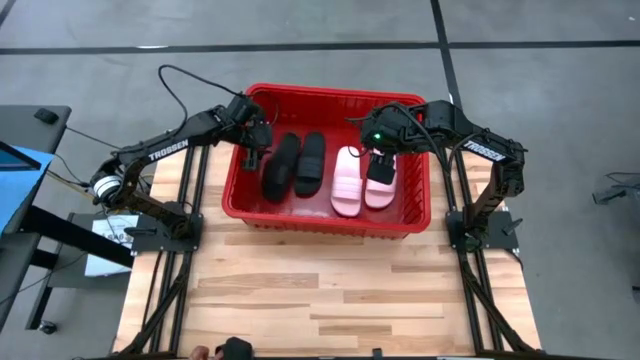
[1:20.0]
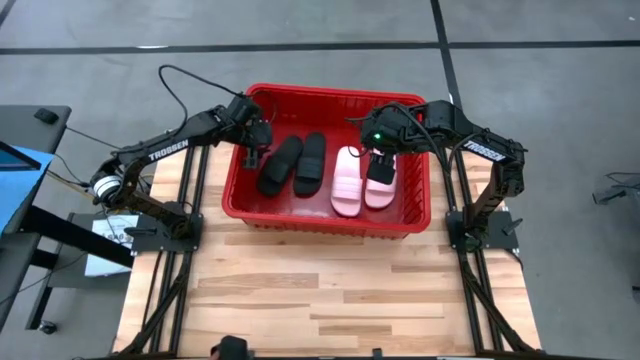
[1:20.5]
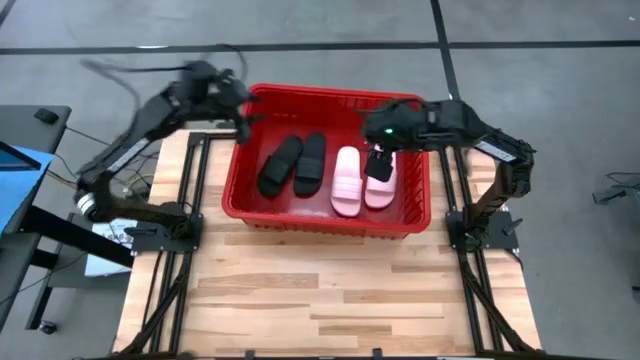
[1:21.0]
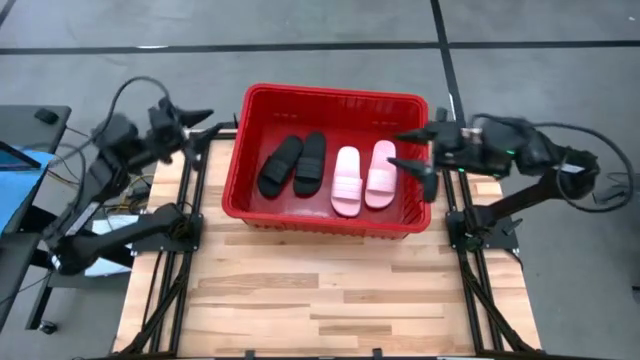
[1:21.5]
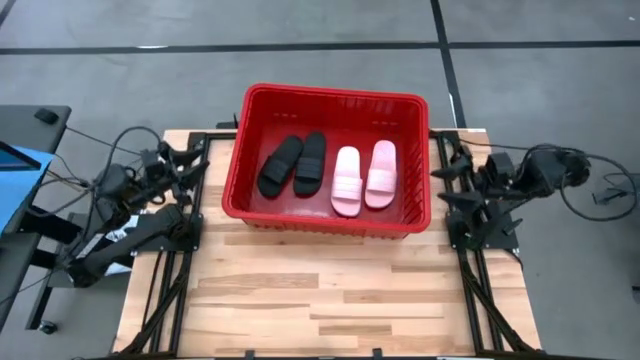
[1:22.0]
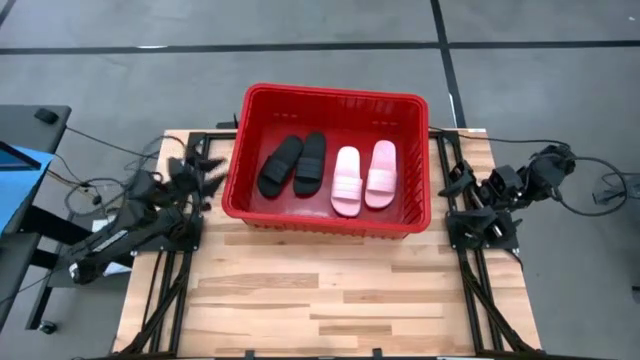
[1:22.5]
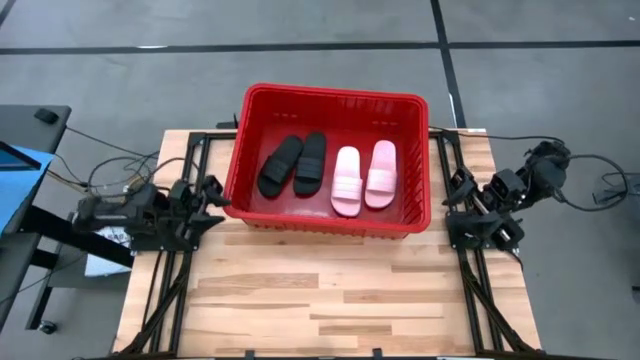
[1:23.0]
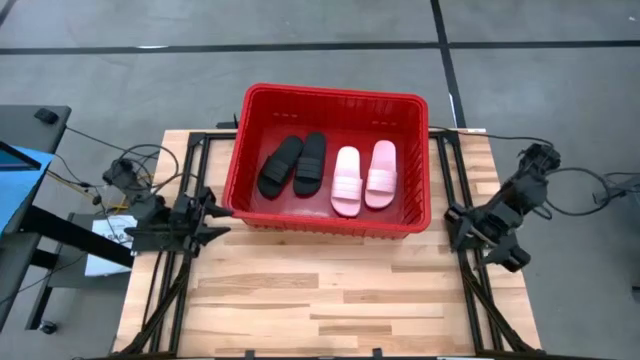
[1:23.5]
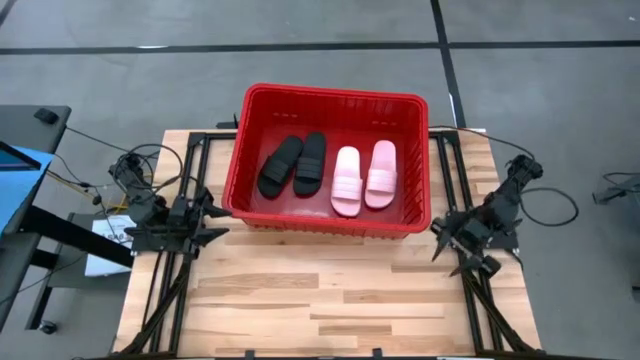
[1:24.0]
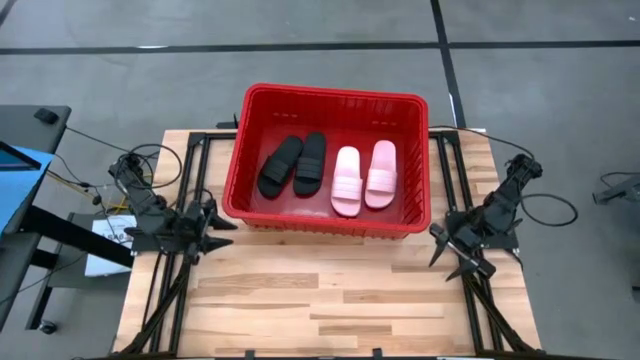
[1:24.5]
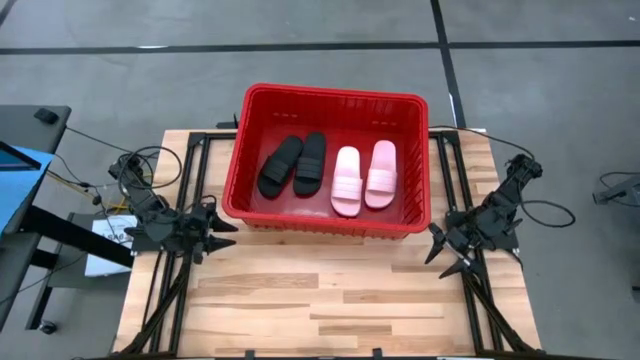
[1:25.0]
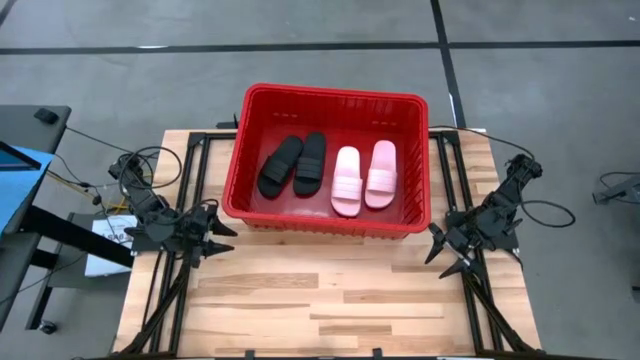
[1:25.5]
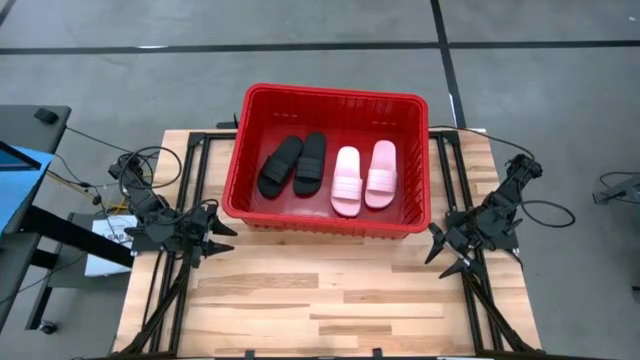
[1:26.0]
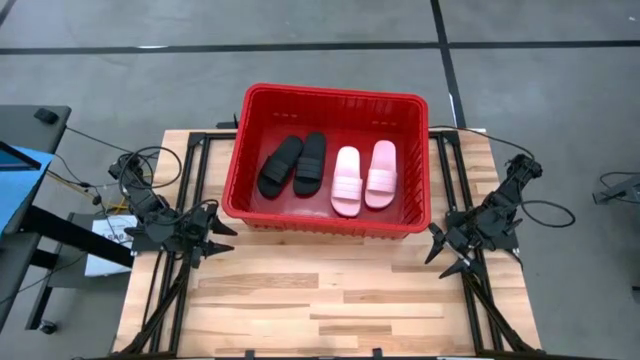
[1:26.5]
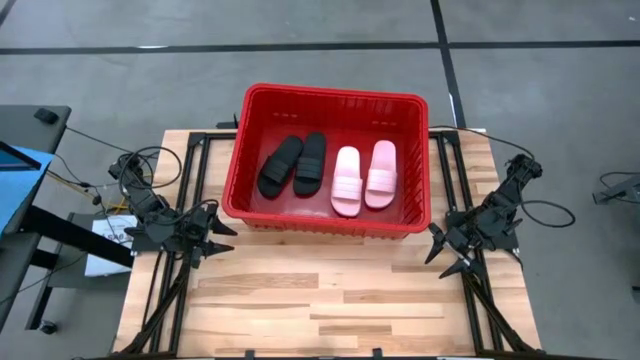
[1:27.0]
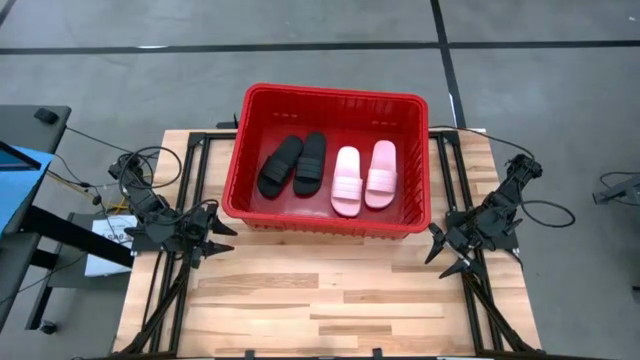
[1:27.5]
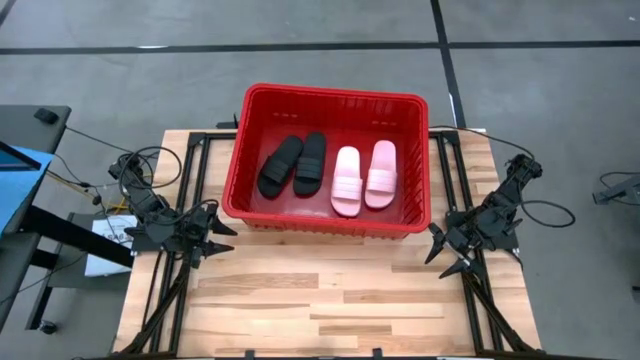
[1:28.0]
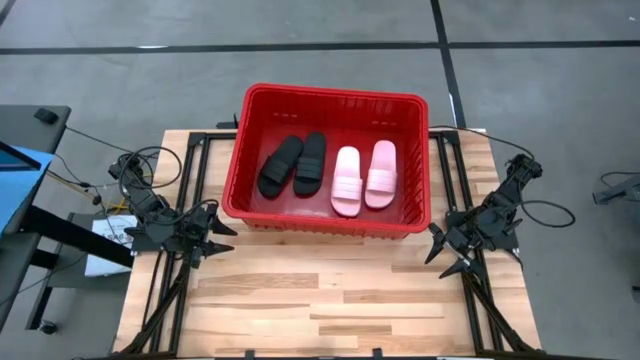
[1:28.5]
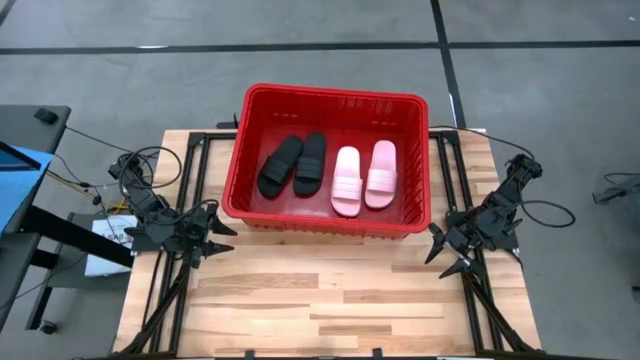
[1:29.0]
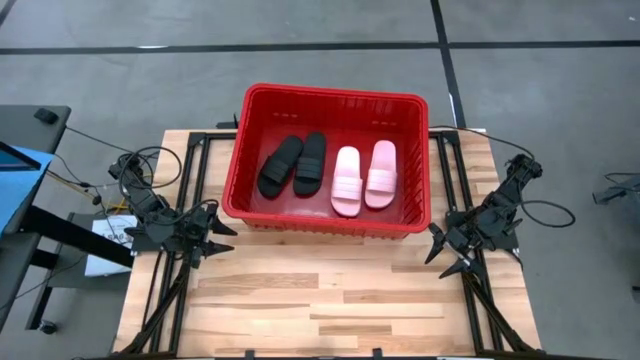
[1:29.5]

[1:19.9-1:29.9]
Task: Pick and place slides into bin
Return to Home Position

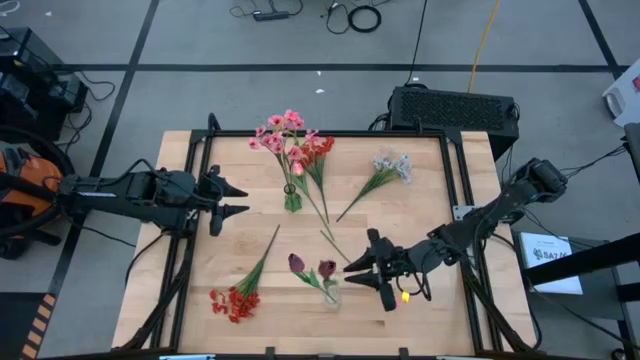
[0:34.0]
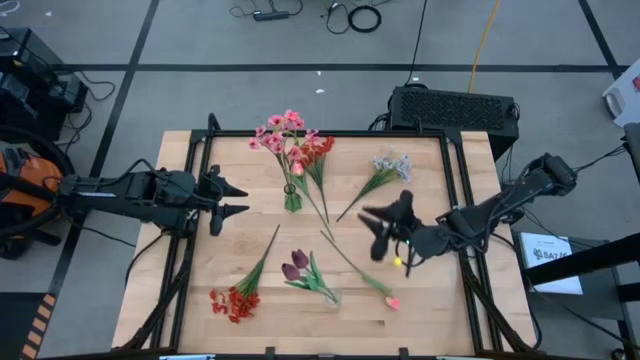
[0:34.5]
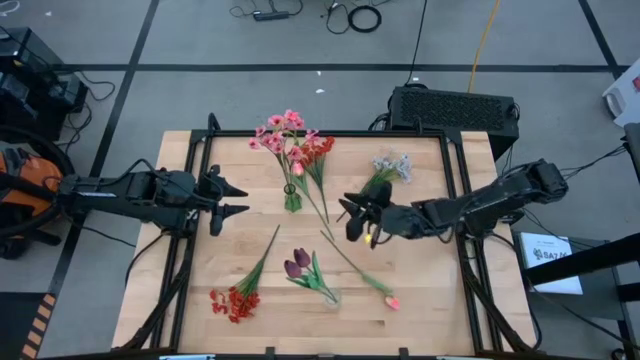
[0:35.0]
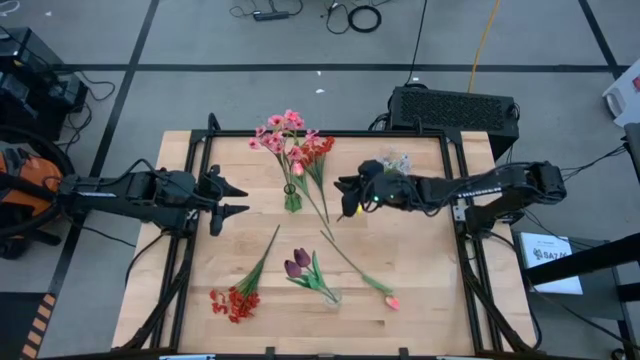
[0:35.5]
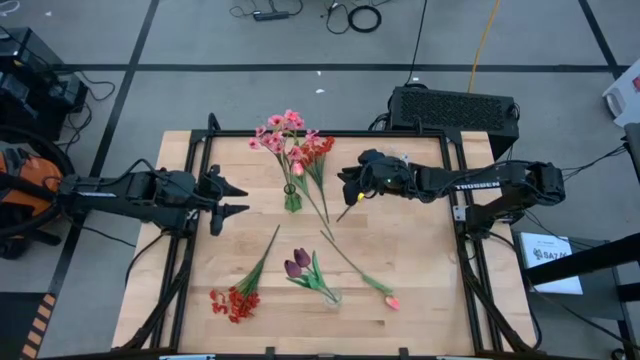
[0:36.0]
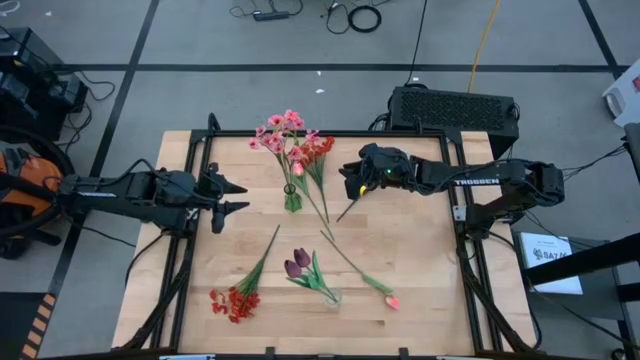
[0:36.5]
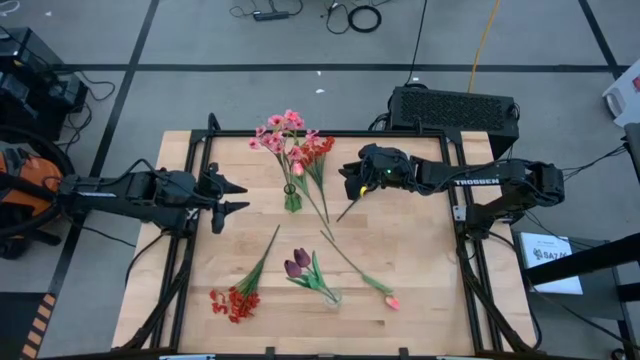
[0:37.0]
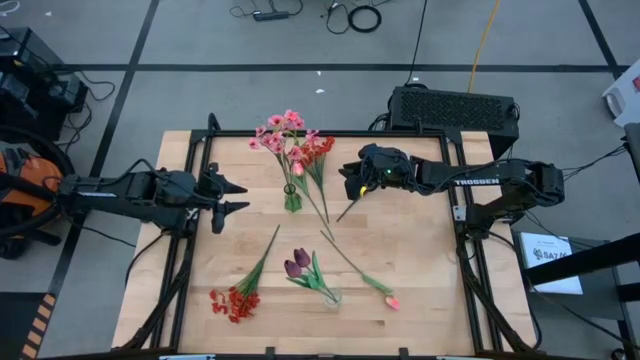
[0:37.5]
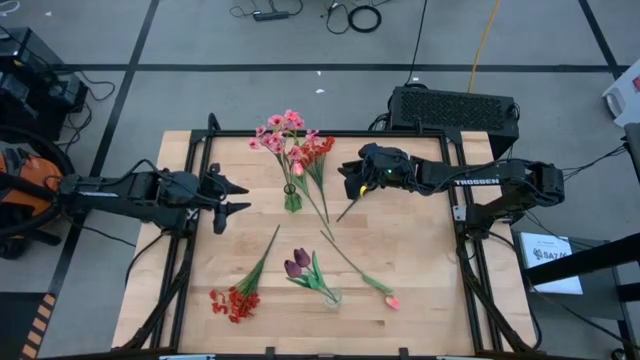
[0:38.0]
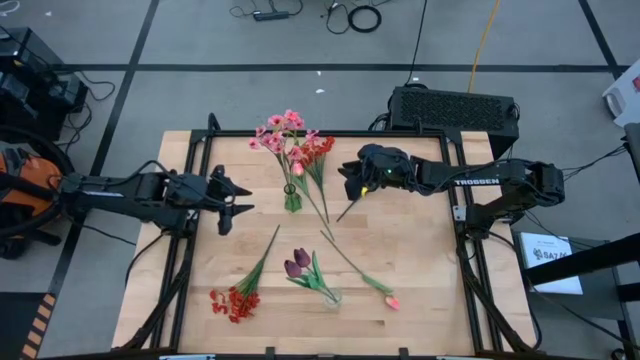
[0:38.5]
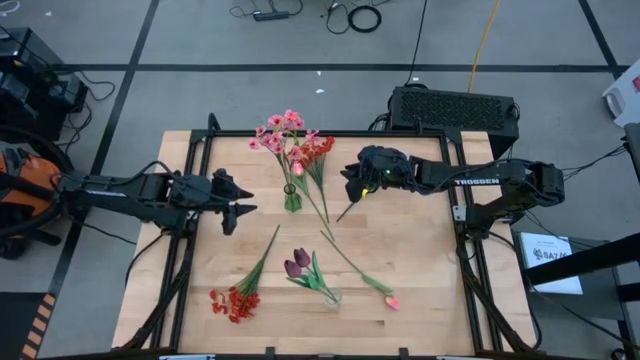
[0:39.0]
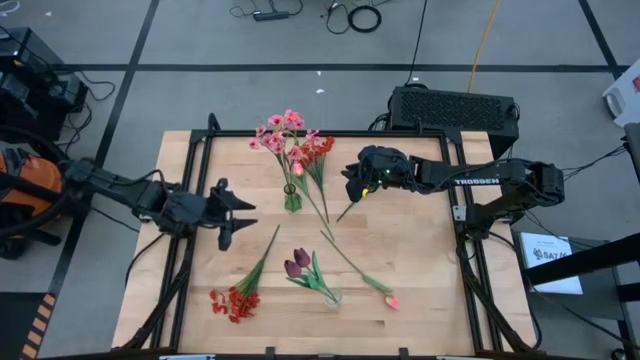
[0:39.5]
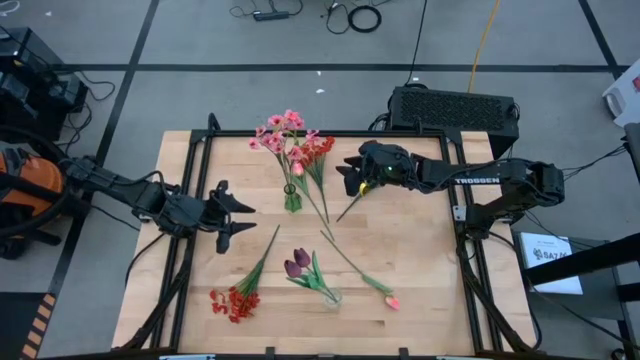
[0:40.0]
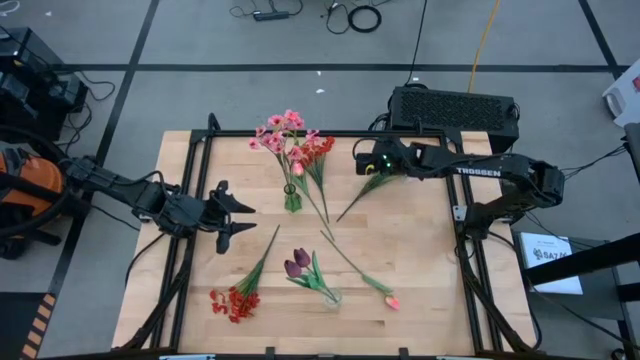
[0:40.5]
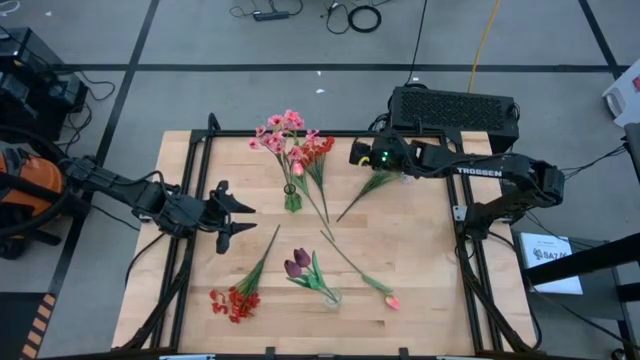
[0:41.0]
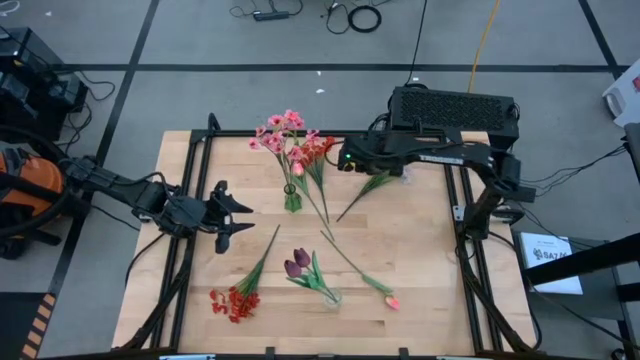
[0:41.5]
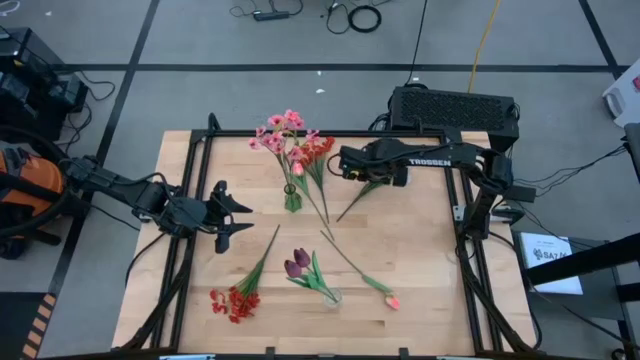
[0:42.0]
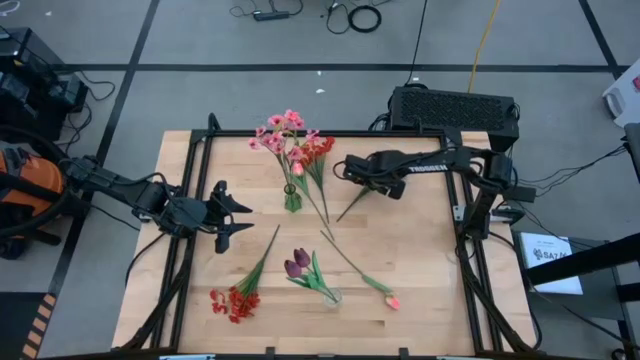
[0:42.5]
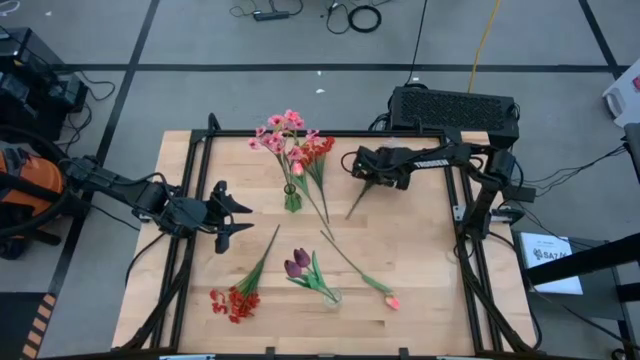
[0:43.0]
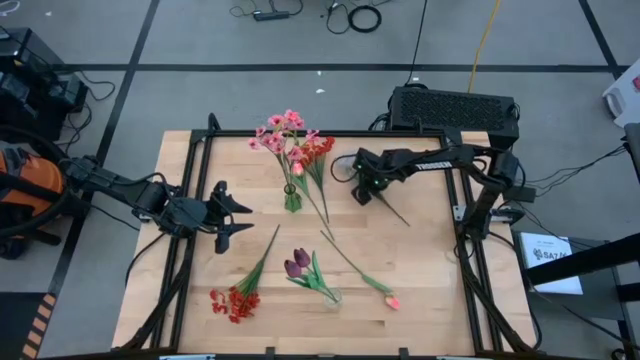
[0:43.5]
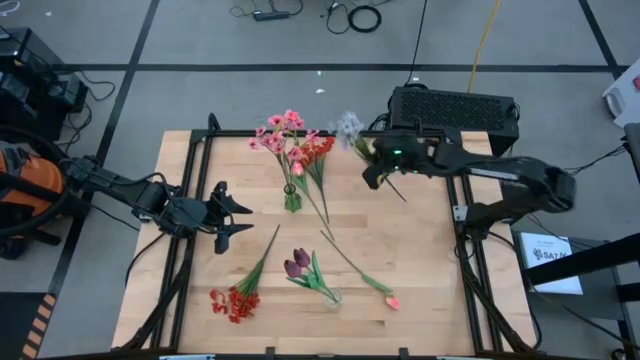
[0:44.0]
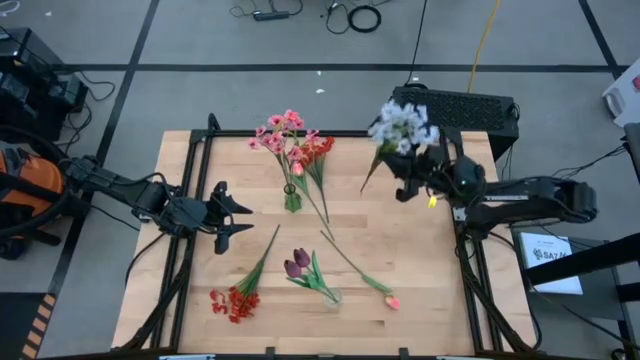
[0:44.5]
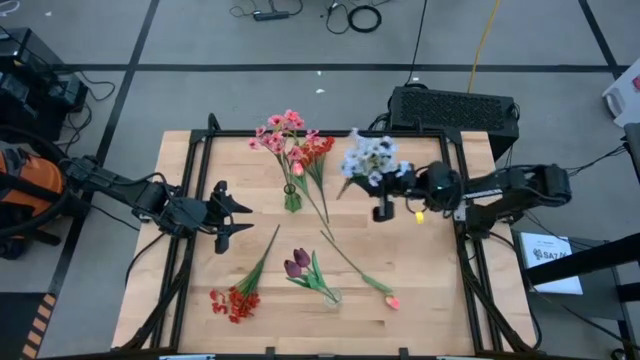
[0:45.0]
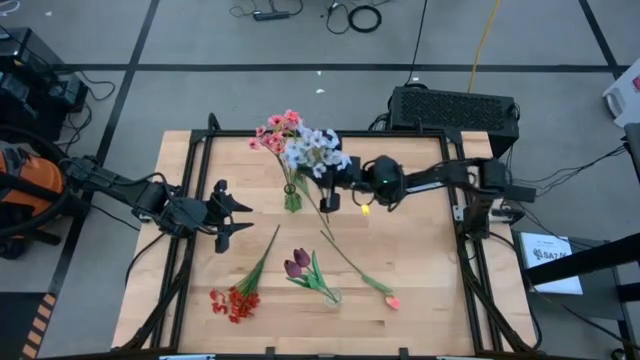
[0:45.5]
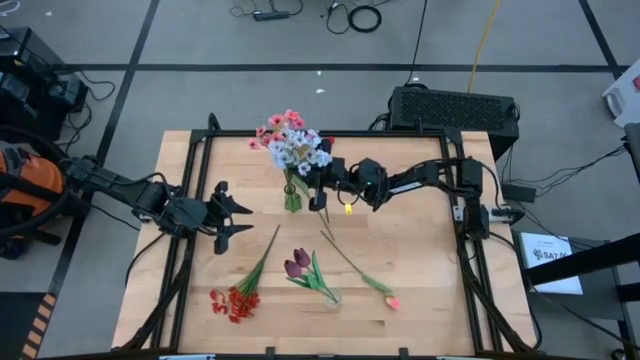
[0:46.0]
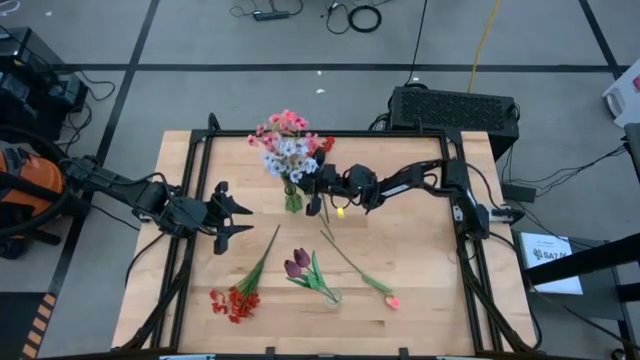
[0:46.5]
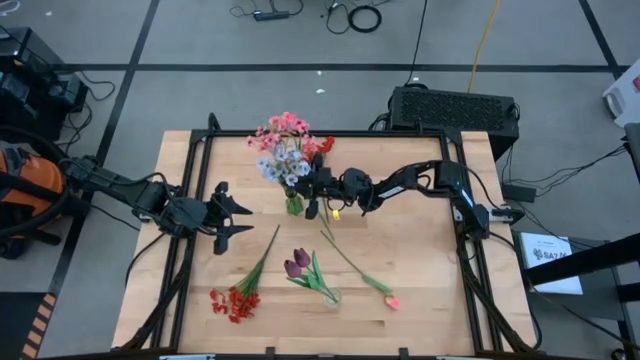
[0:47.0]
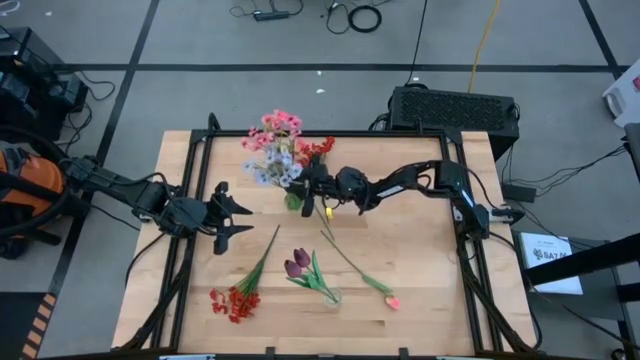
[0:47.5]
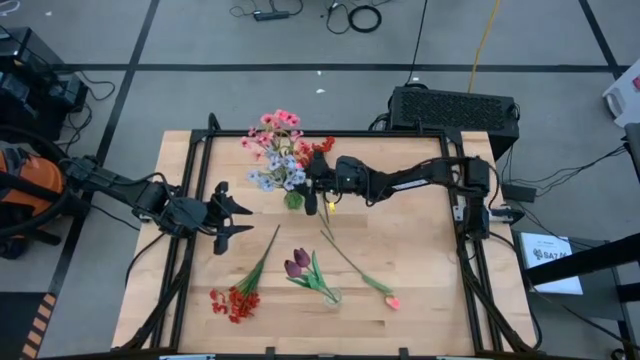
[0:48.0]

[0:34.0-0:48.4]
Task: Sort flowers into vase by color
Put the white flowers into the green vase
